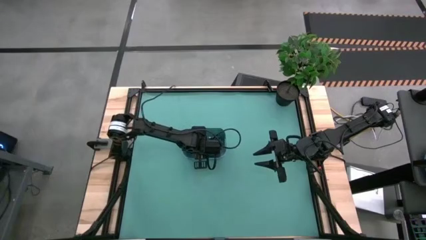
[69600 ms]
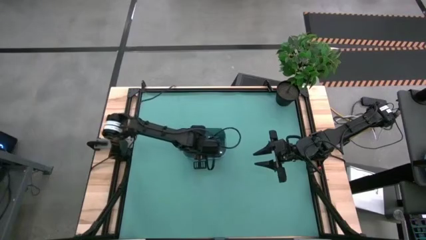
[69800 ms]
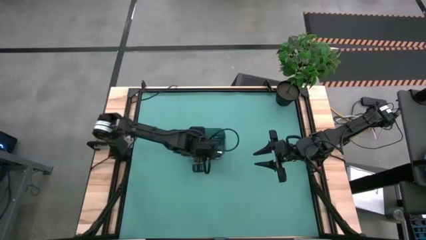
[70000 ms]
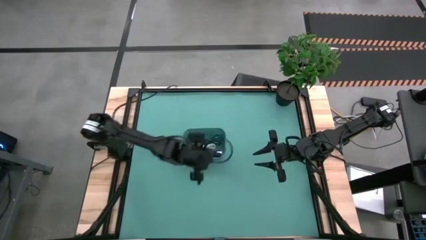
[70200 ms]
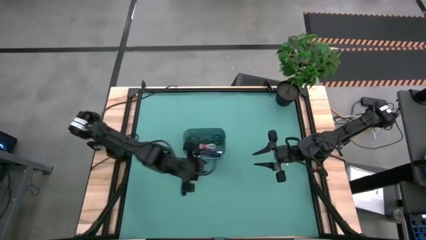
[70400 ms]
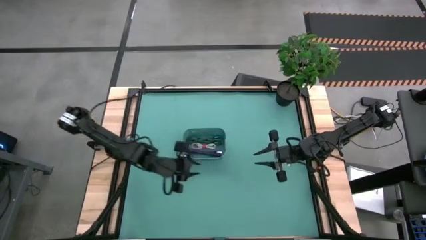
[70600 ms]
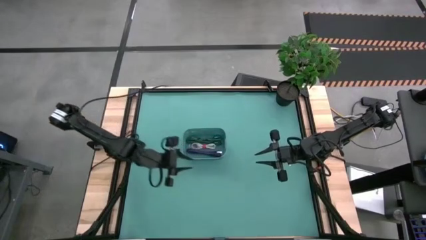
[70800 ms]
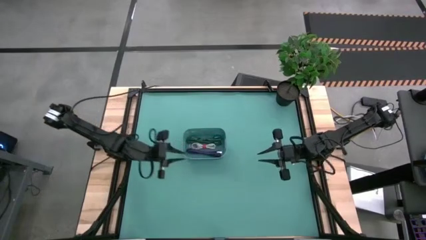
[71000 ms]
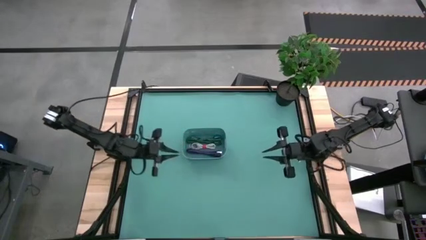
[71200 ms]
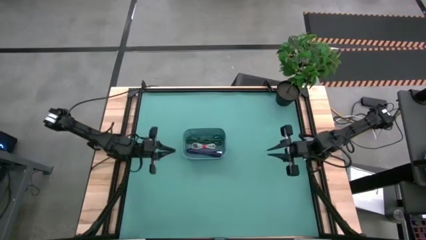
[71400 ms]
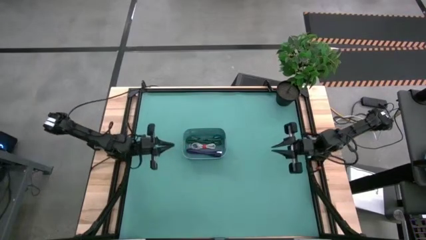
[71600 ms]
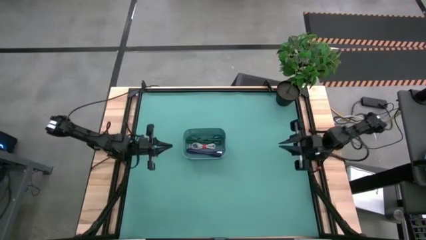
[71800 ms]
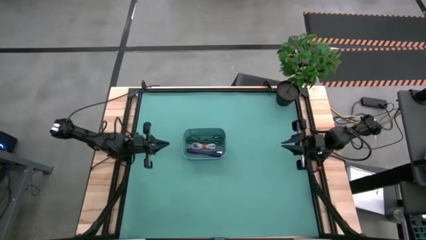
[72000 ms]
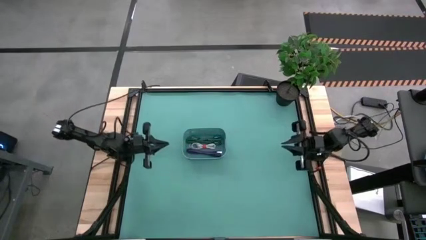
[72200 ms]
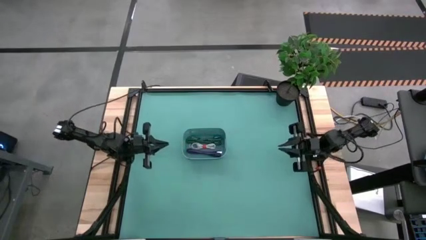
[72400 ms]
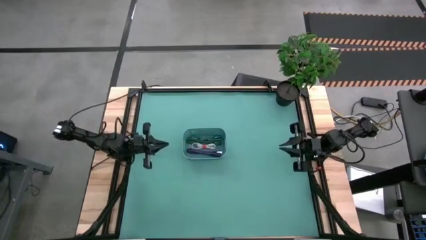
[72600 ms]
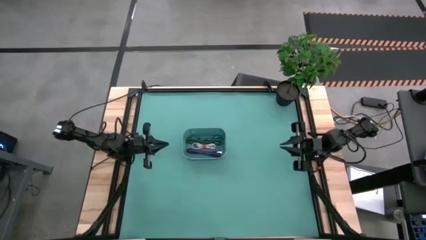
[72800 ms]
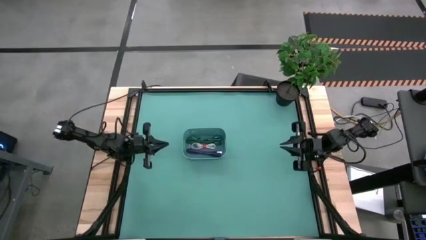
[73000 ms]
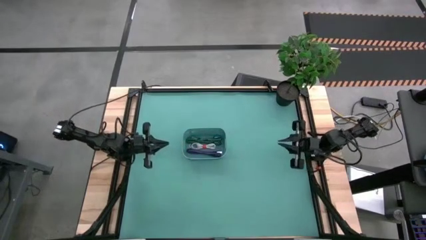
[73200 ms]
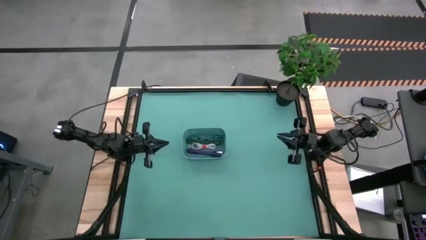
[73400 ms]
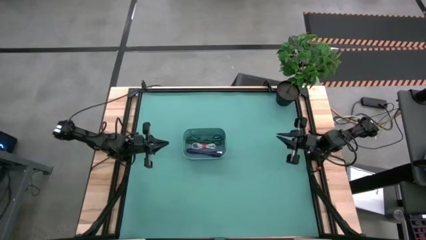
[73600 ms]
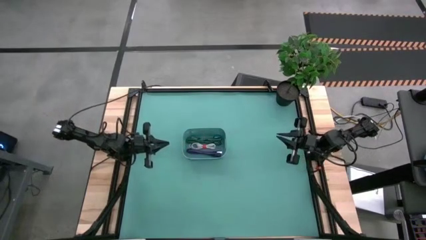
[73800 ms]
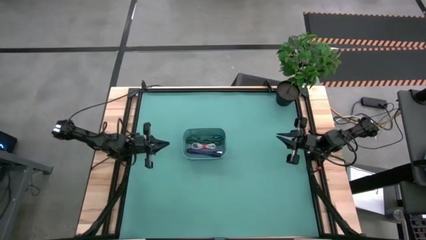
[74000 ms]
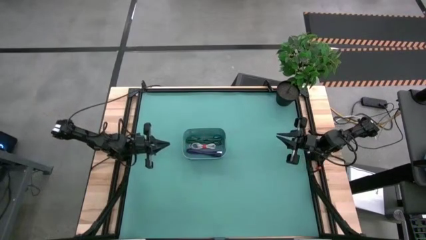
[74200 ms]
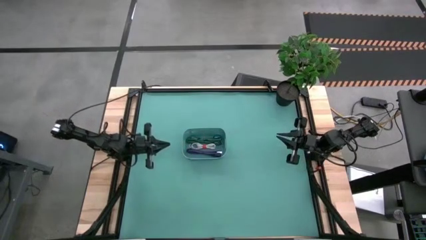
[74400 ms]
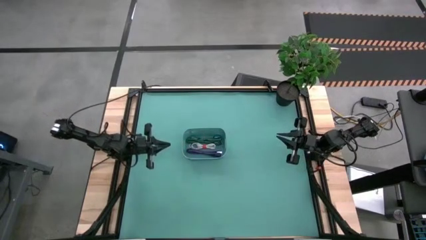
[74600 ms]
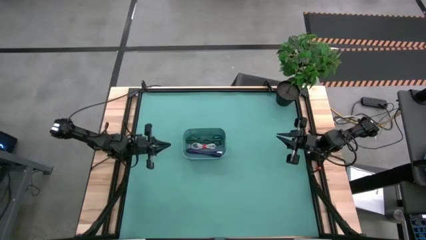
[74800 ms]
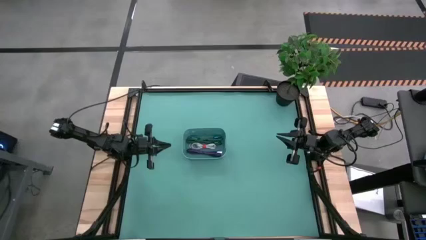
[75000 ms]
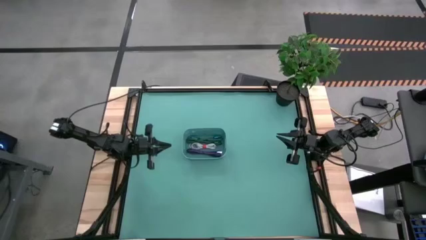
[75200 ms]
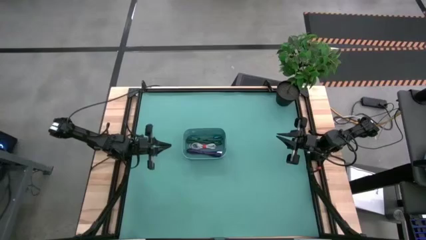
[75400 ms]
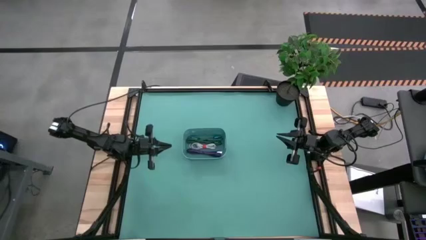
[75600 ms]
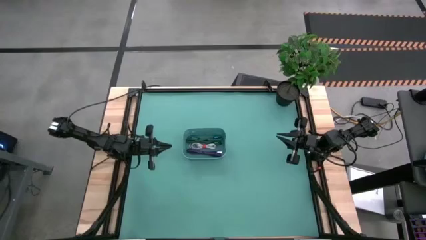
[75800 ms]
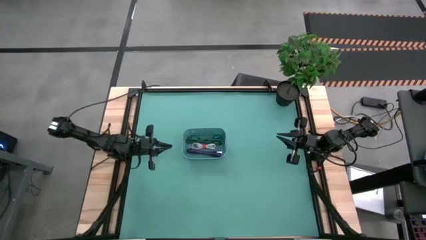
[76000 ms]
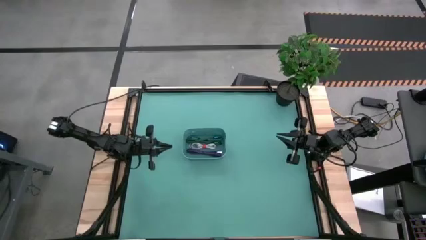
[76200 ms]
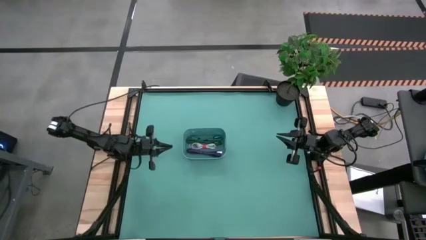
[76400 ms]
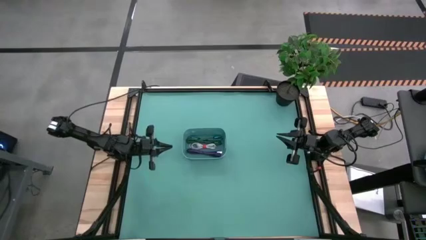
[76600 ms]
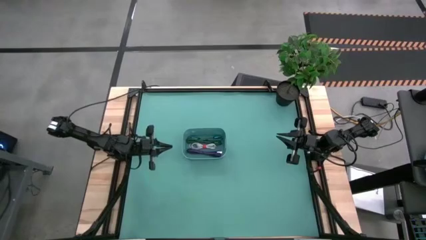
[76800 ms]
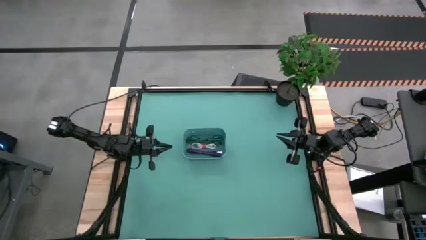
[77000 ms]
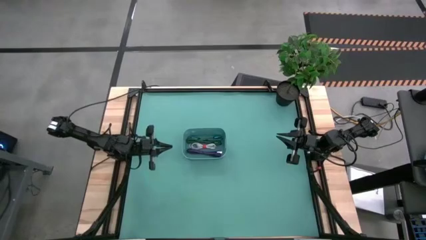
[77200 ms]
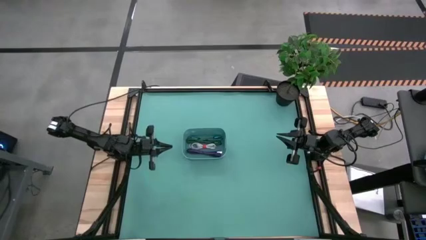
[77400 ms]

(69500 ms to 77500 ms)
Task: Pick and place USB-C Cables
Return to Home Position

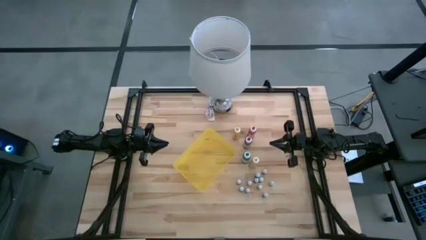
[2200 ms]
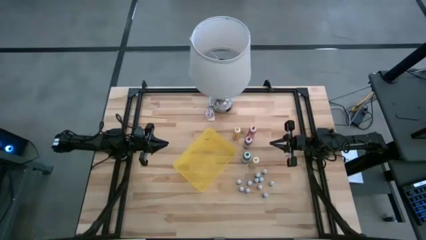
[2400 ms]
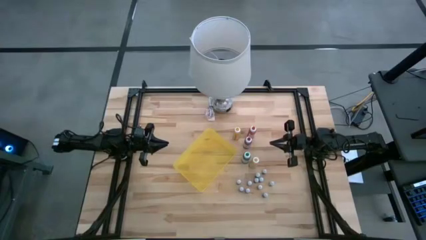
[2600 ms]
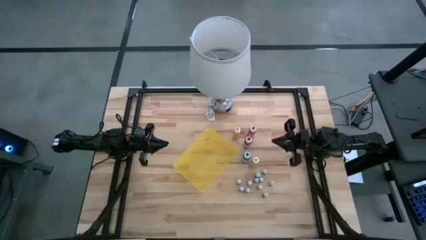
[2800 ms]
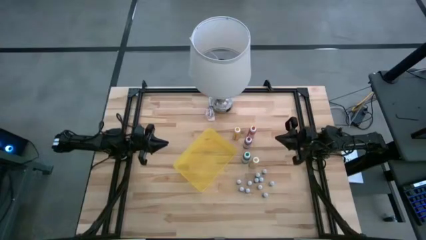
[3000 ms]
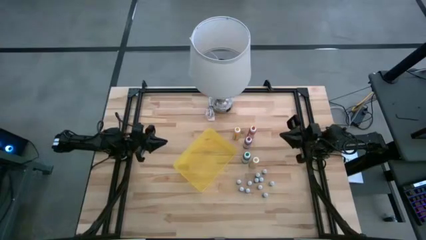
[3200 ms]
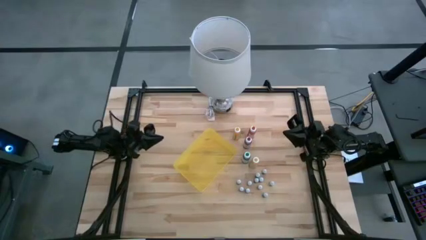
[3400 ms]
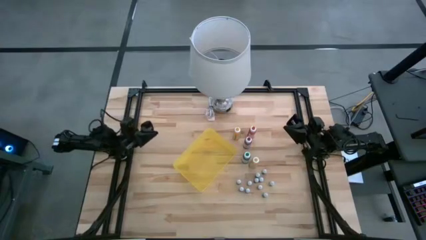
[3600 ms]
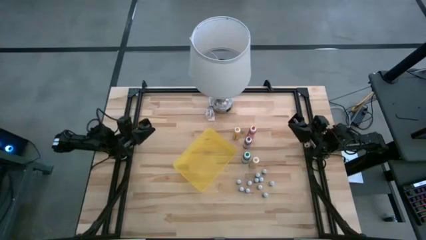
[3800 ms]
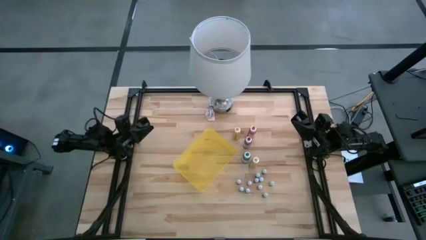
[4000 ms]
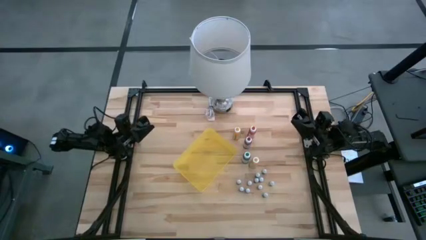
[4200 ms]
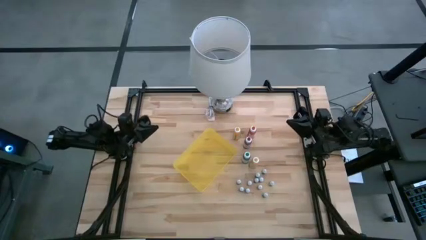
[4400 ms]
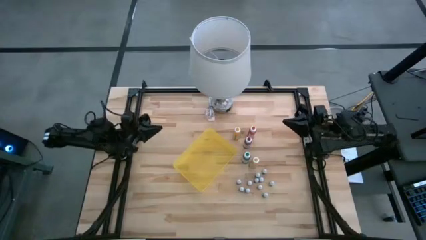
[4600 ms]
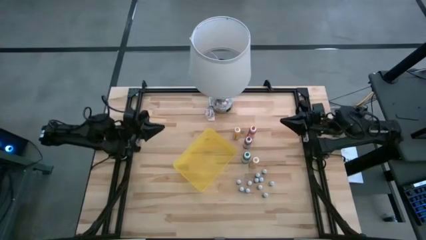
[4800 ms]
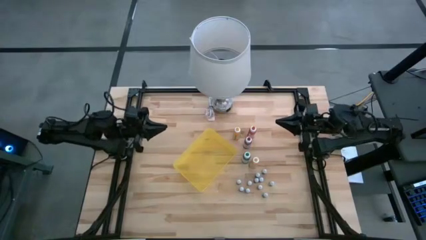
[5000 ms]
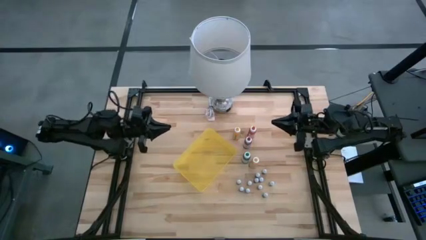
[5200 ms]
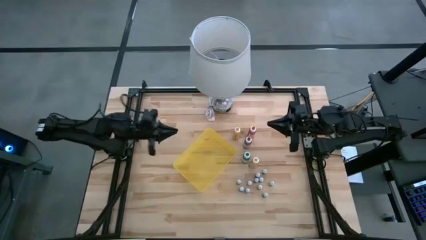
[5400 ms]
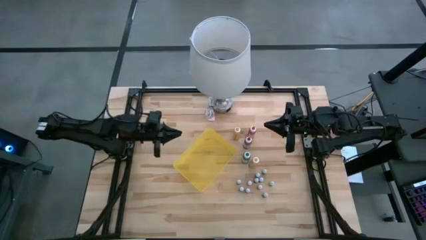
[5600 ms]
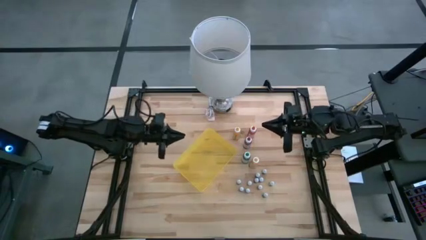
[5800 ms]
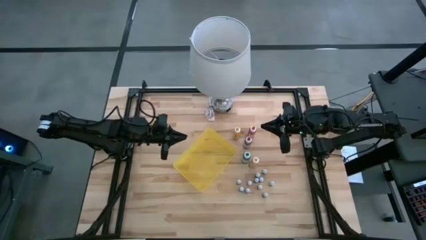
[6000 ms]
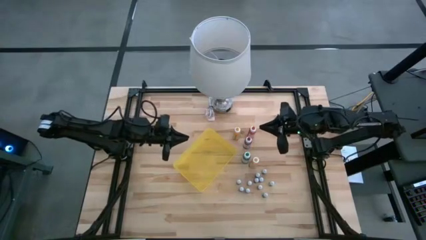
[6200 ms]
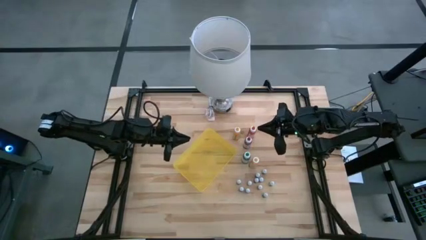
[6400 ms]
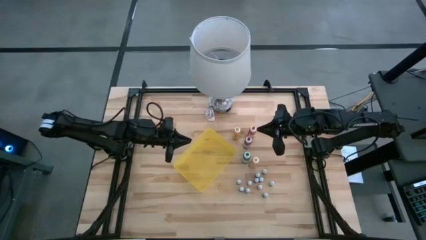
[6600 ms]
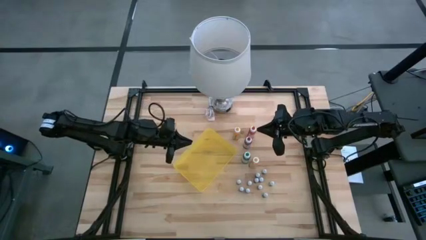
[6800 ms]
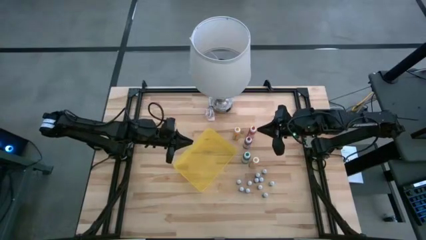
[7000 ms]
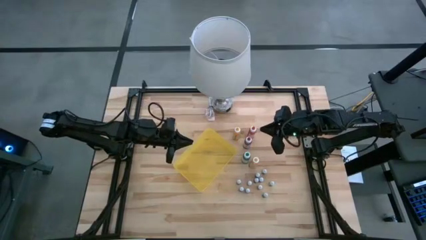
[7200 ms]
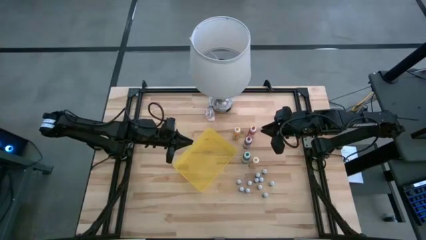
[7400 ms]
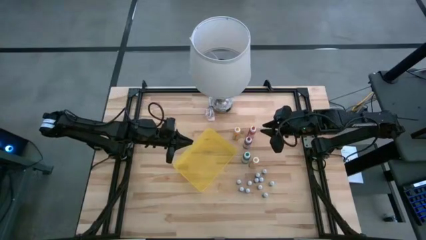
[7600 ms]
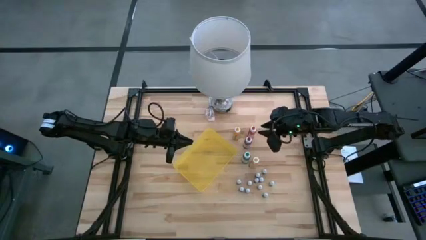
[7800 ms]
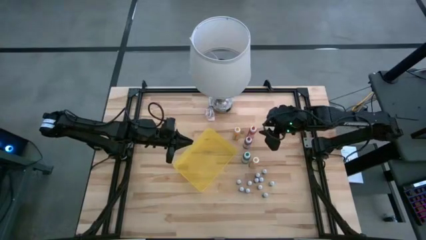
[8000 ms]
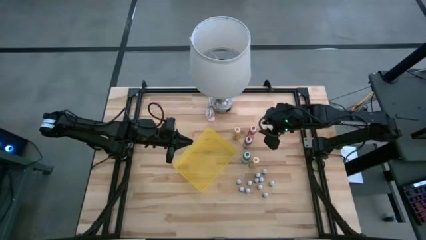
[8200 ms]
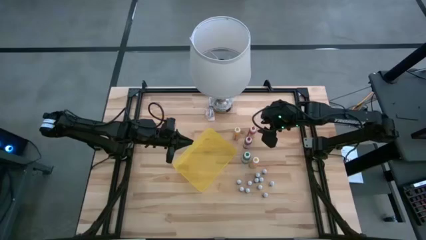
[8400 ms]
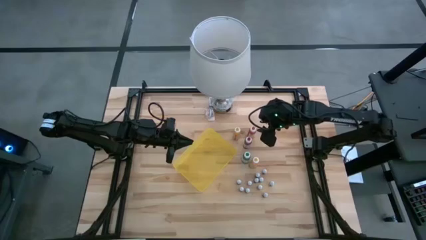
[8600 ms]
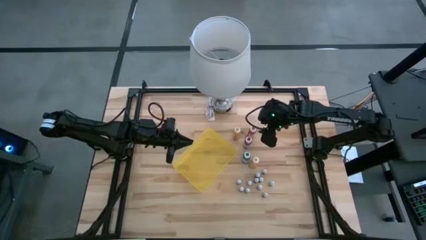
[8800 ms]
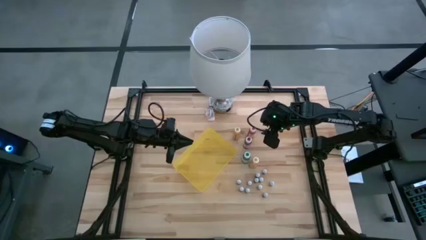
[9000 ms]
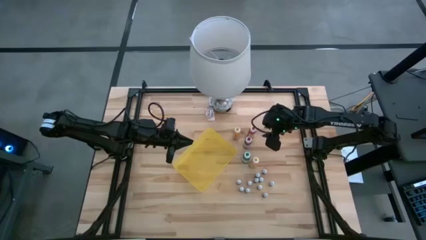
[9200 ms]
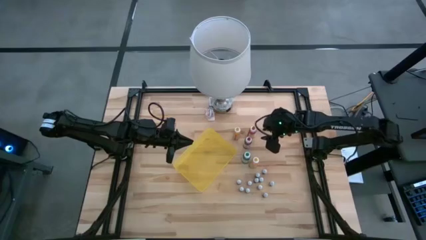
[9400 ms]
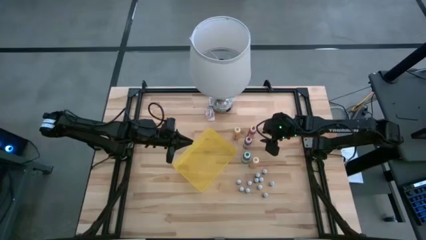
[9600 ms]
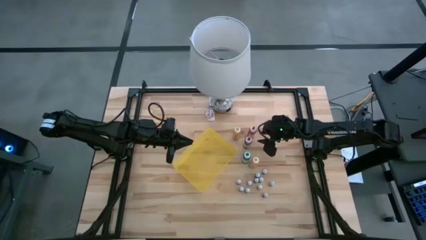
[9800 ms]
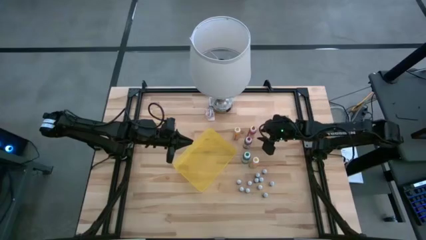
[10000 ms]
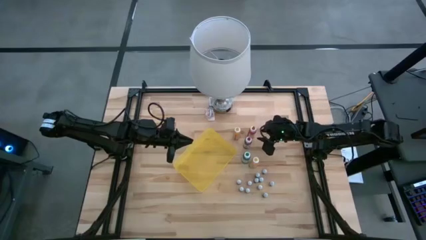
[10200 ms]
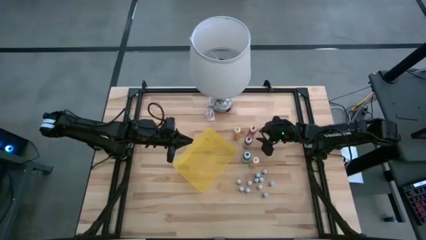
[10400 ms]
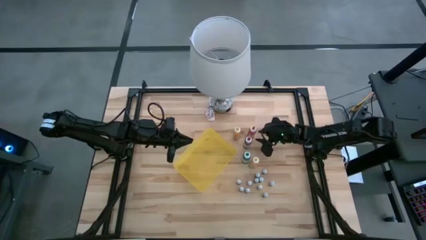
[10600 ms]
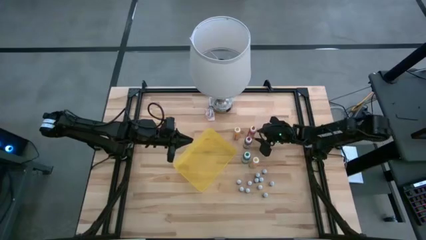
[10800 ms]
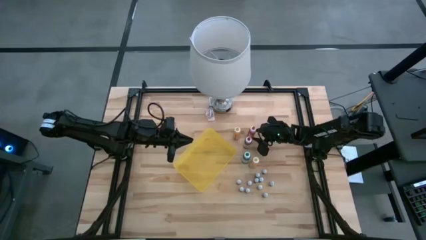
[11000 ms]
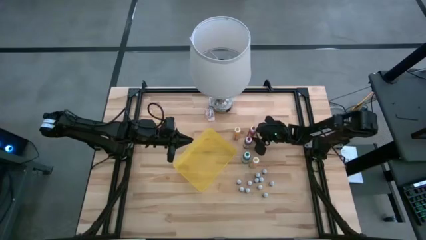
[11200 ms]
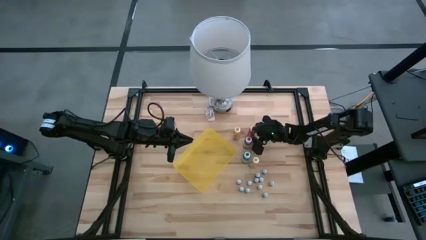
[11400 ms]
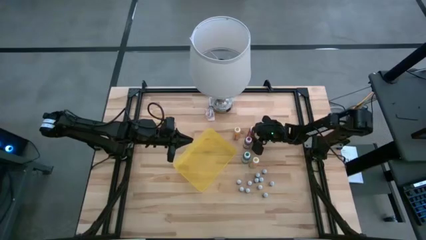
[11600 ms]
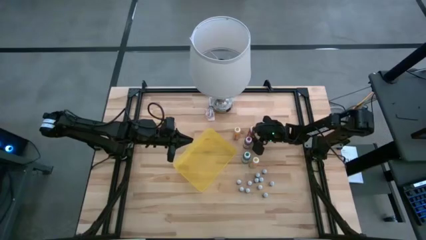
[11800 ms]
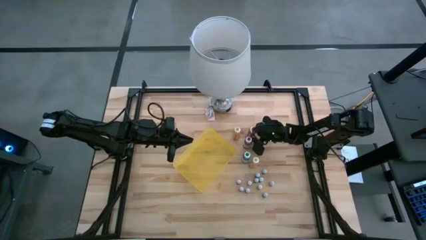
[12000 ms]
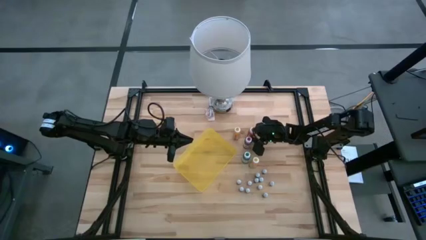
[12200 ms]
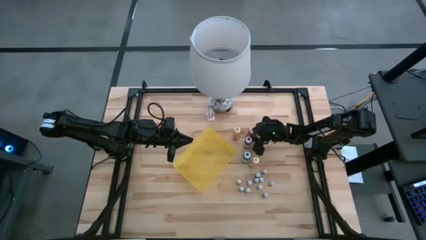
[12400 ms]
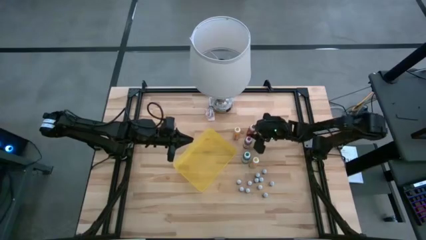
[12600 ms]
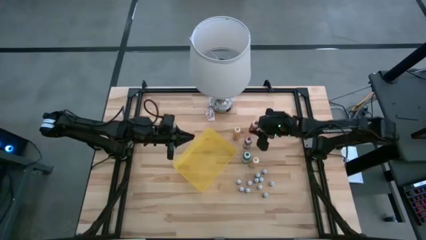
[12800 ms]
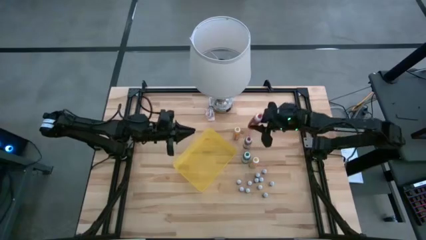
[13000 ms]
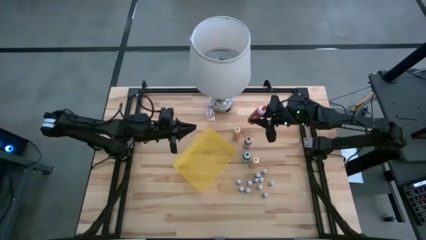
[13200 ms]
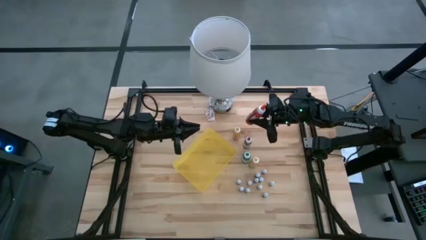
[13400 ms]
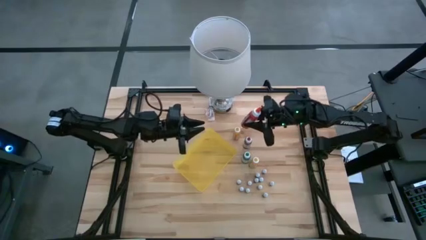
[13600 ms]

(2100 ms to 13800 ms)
Task: Pick & Place food coloring
Put the large orange food coloring bottle into the yellow bin
